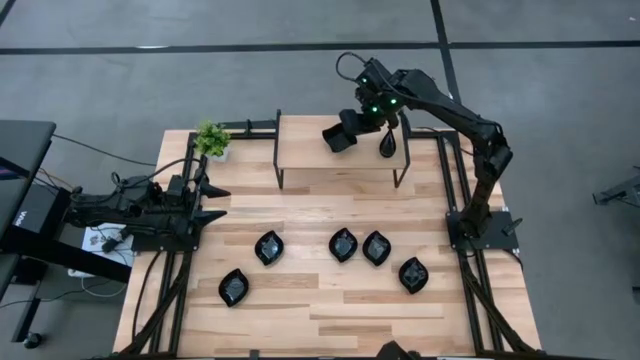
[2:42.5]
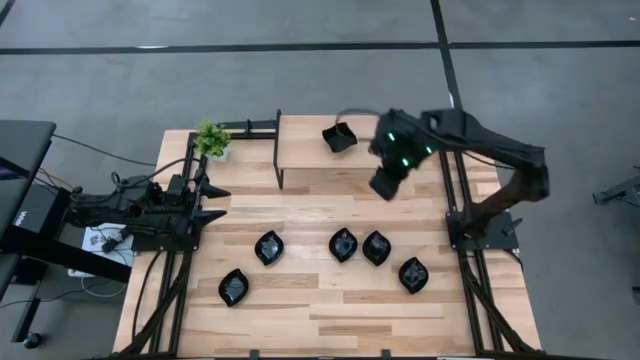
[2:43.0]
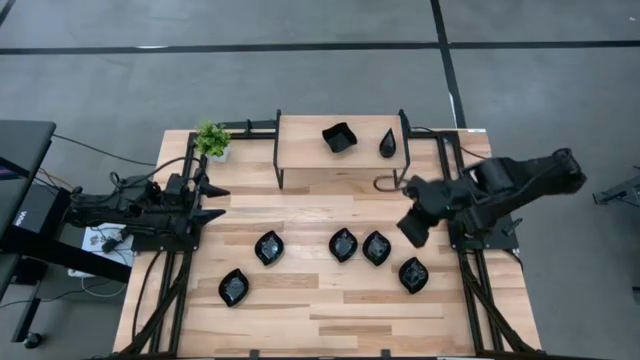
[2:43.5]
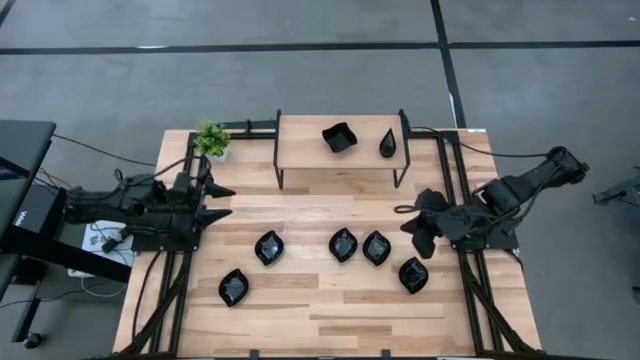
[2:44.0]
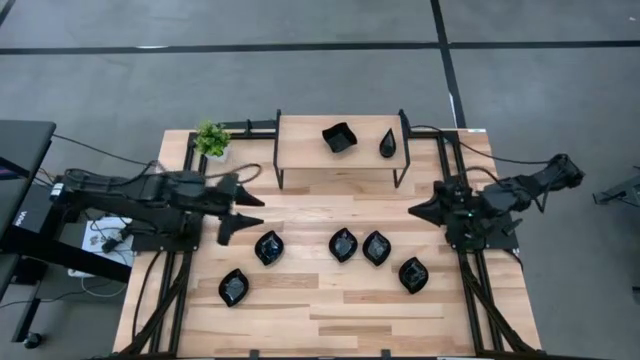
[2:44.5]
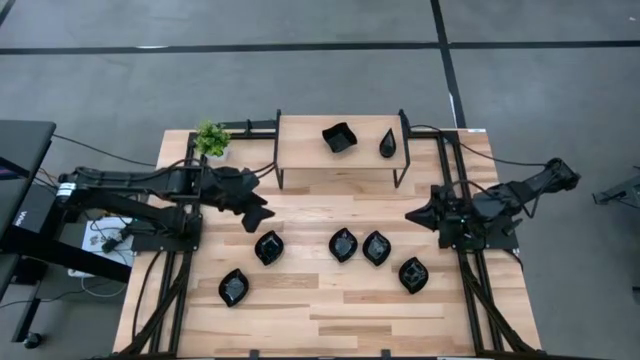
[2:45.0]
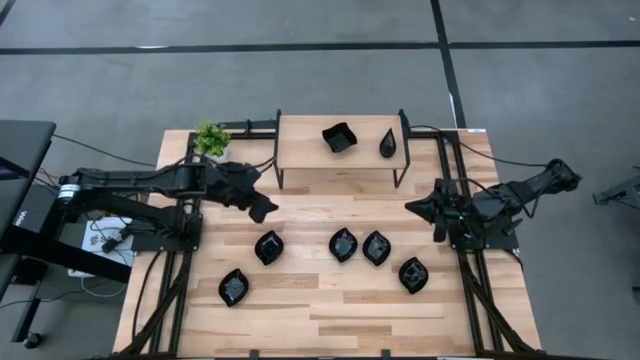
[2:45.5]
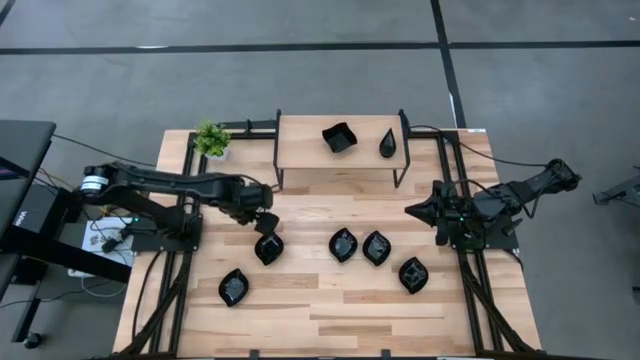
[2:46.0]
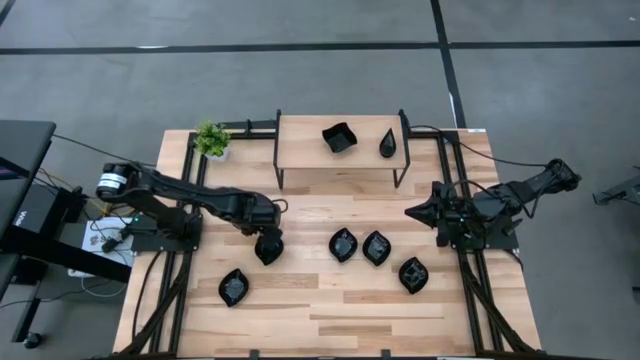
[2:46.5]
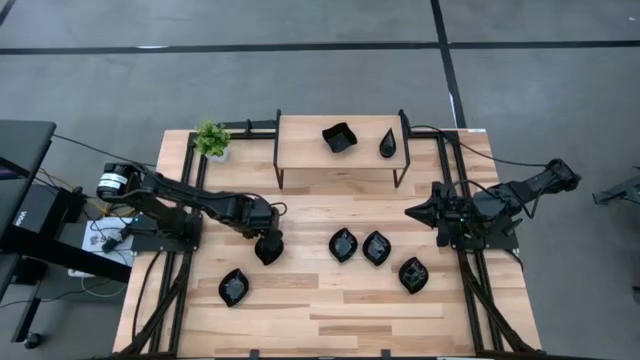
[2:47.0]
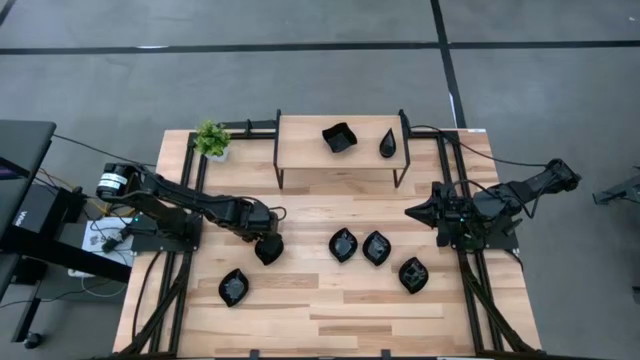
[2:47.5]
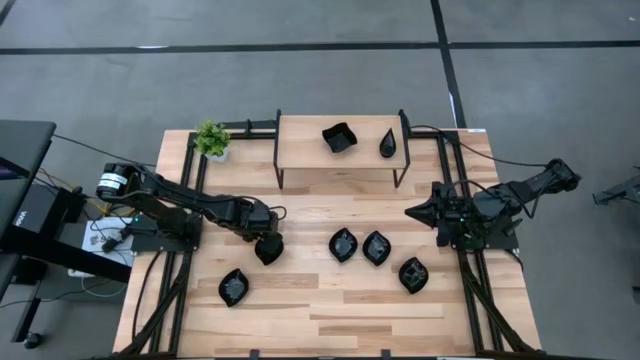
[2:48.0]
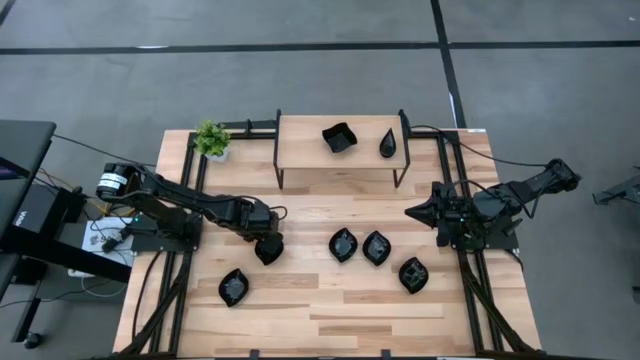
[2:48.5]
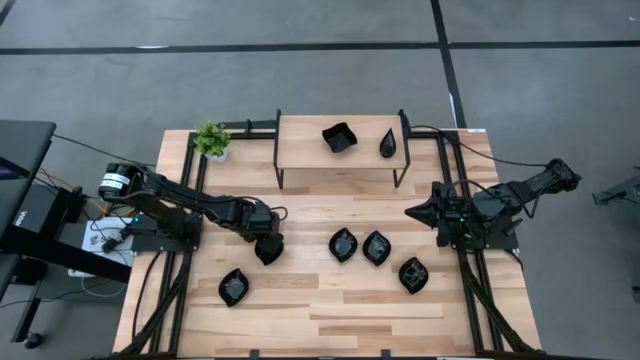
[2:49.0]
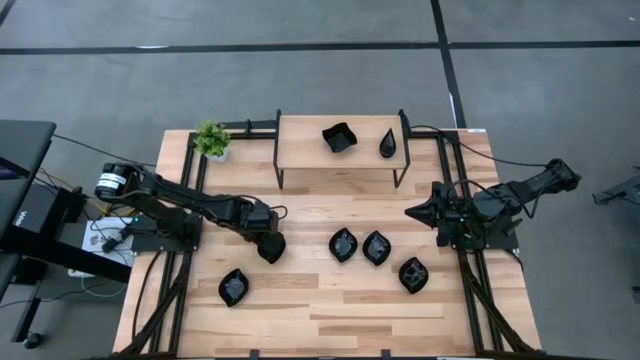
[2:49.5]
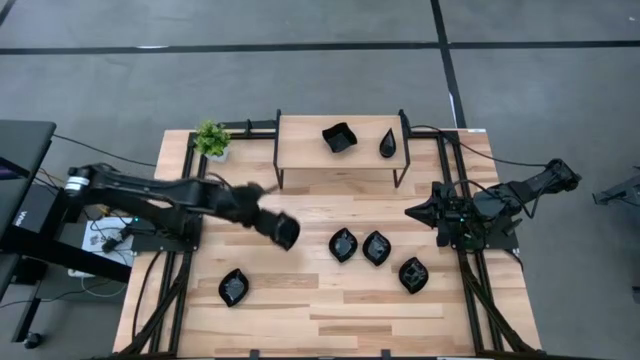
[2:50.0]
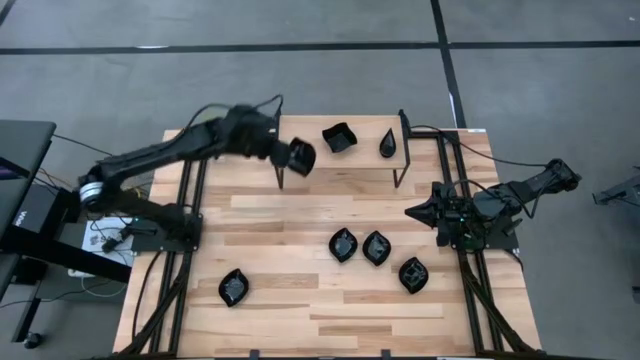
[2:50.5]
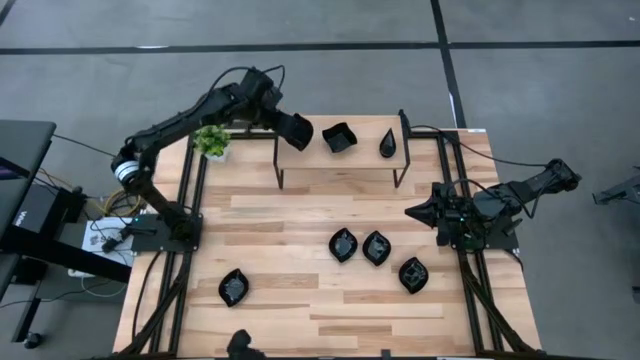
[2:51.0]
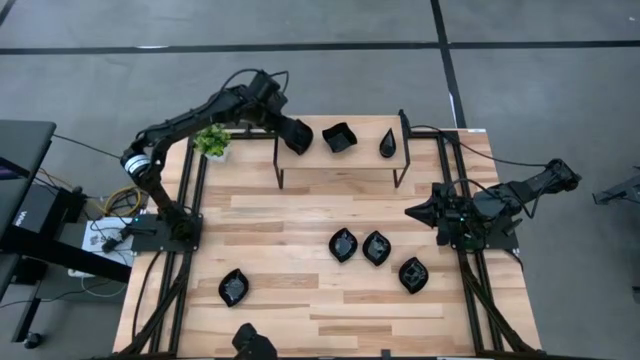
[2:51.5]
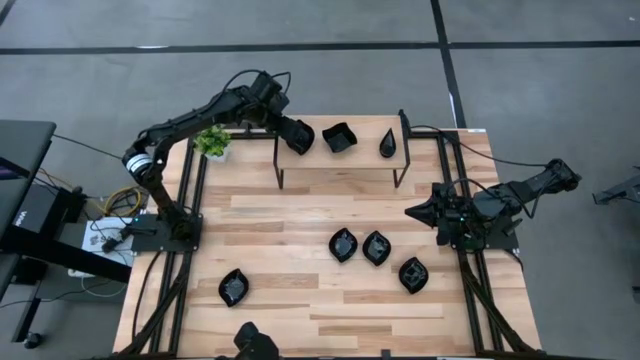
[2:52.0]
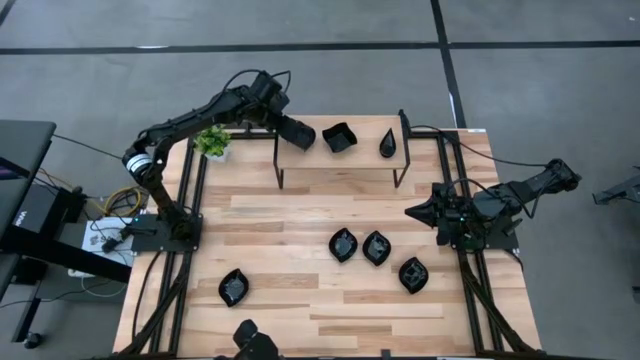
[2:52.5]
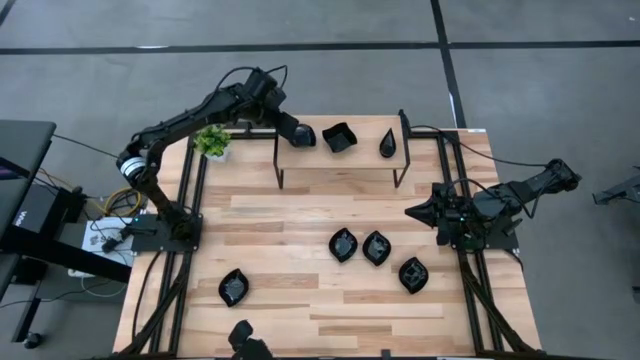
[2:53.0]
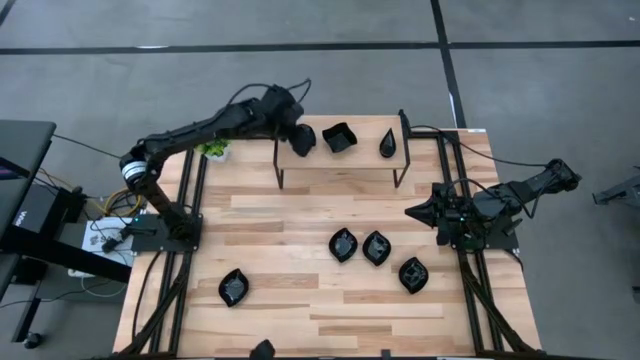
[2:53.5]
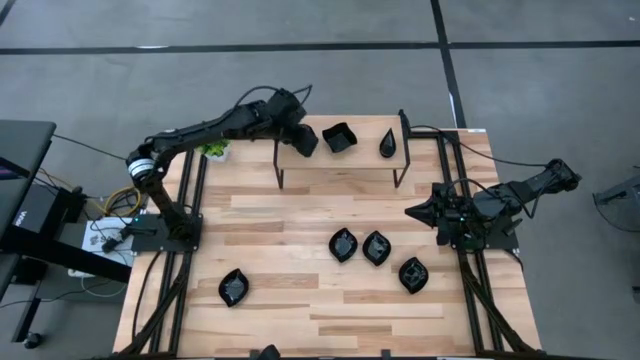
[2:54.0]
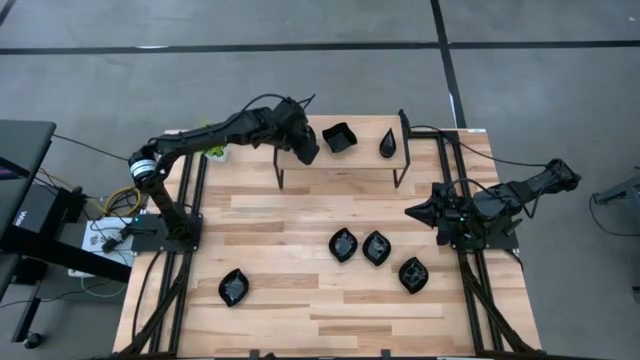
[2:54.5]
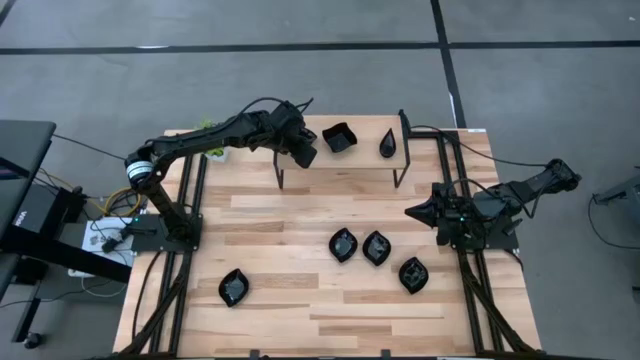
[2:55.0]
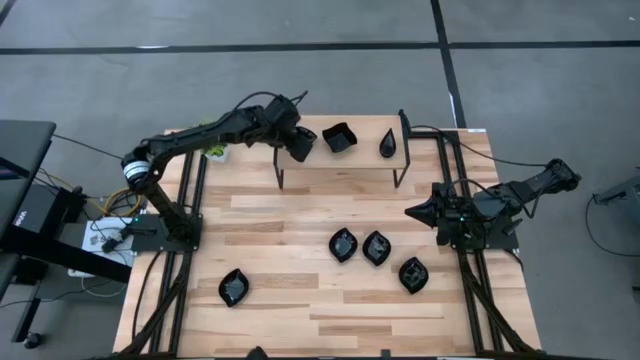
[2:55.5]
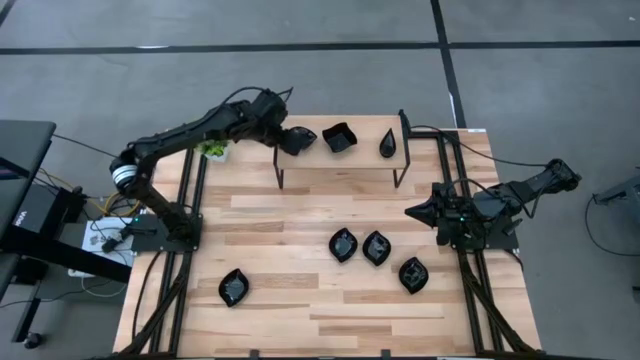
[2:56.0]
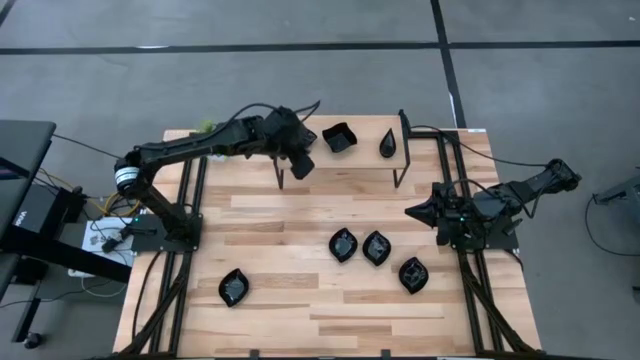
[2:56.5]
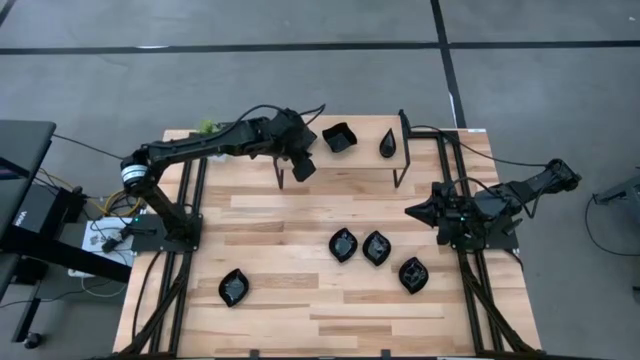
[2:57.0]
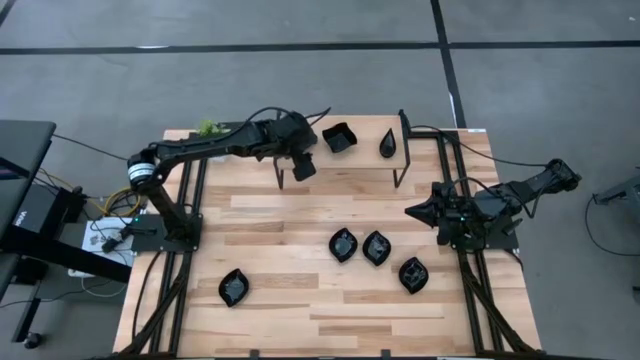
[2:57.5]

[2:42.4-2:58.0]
Task: Pick & Place Mini shaped plates
Put the black plate on the shelf

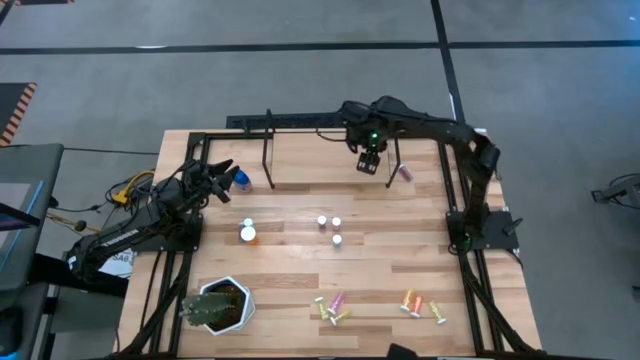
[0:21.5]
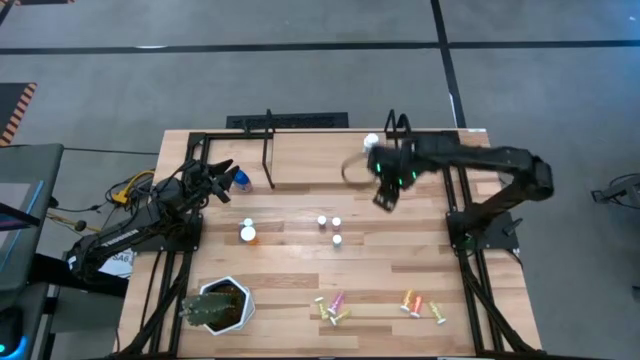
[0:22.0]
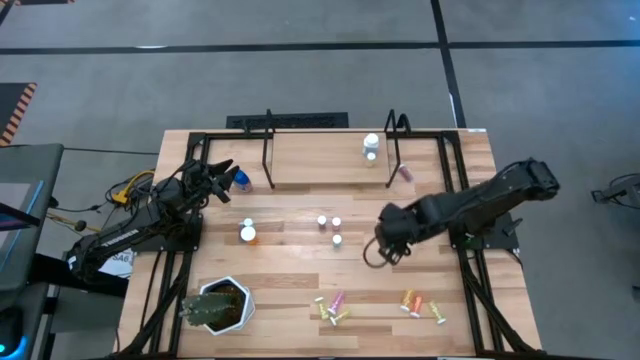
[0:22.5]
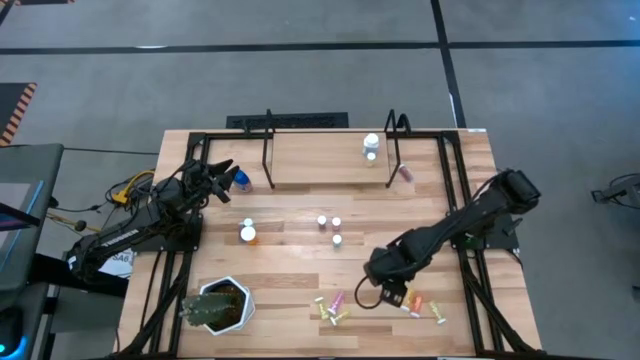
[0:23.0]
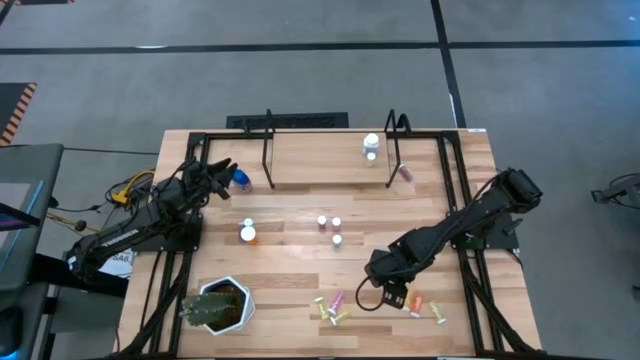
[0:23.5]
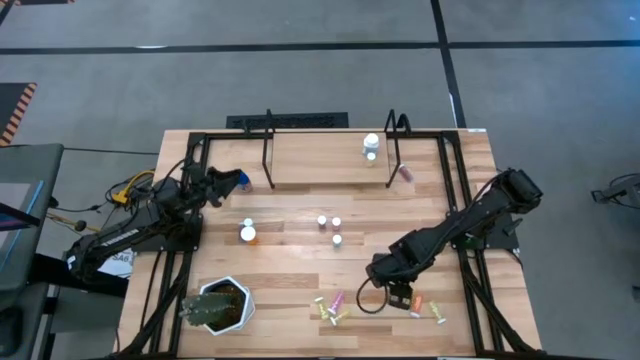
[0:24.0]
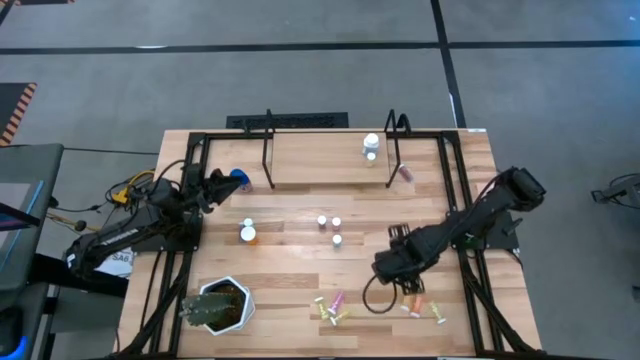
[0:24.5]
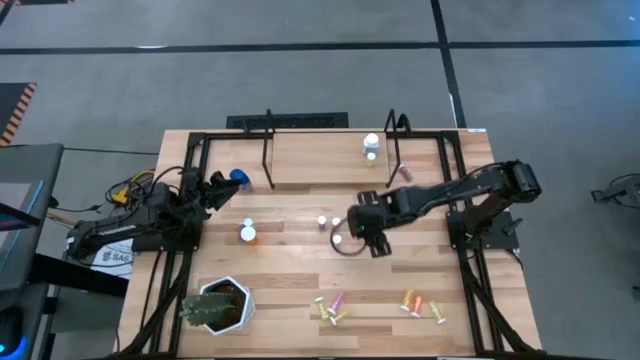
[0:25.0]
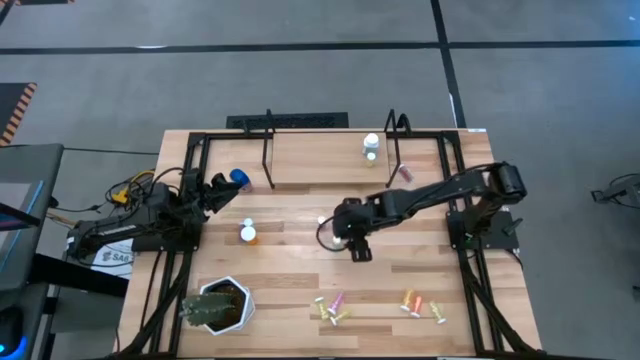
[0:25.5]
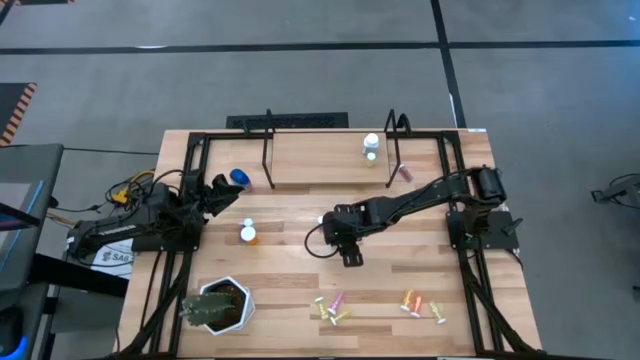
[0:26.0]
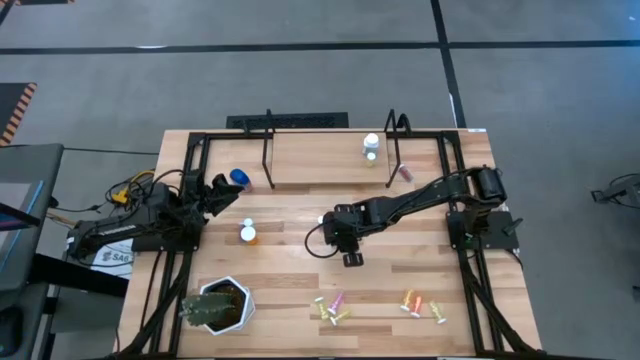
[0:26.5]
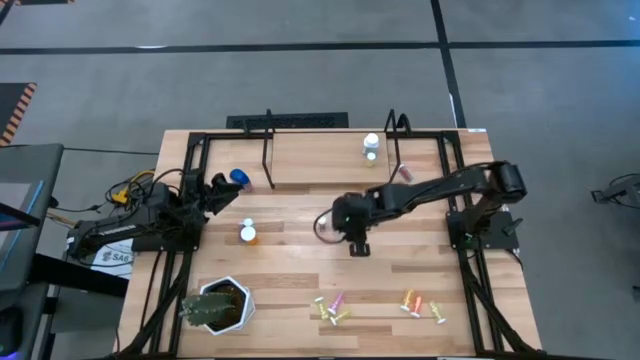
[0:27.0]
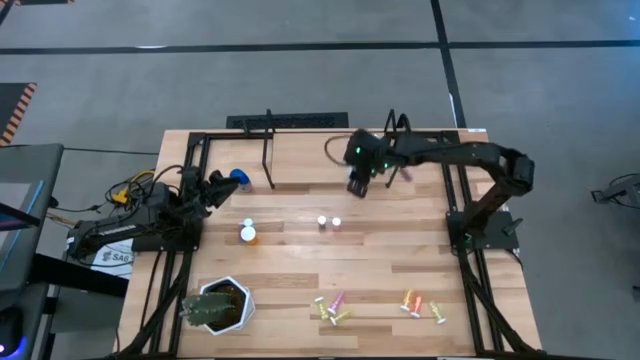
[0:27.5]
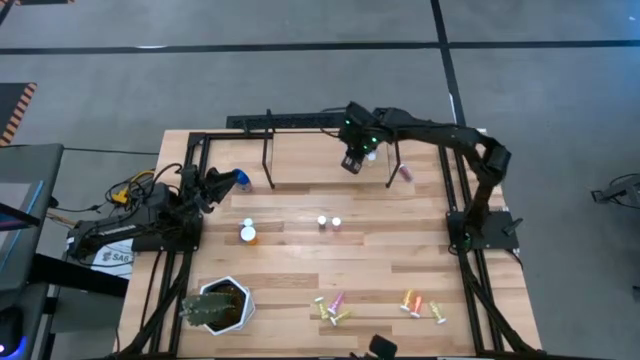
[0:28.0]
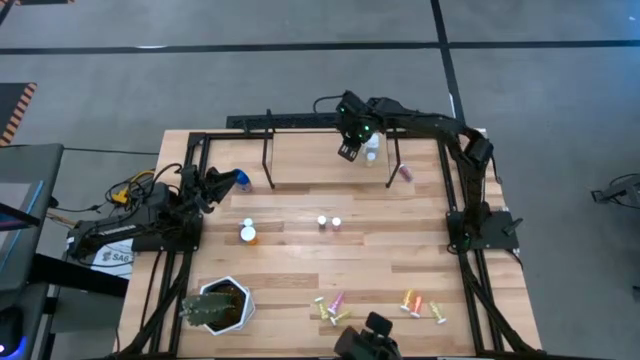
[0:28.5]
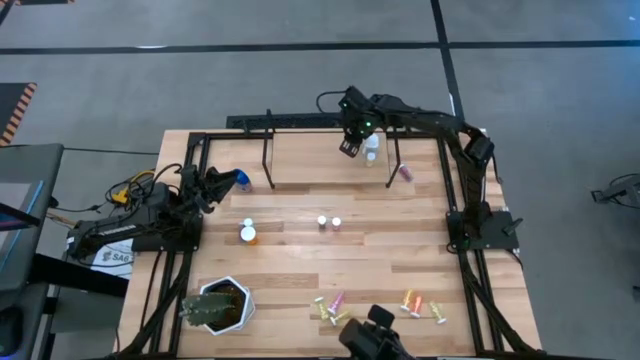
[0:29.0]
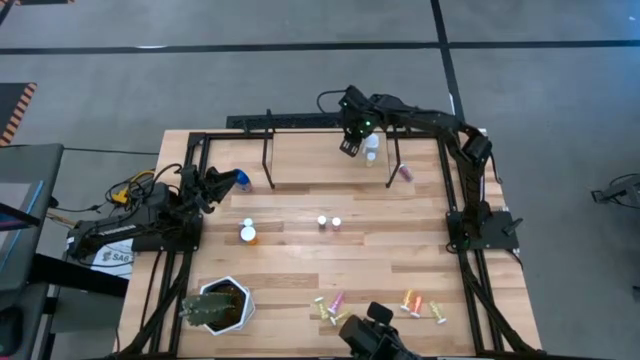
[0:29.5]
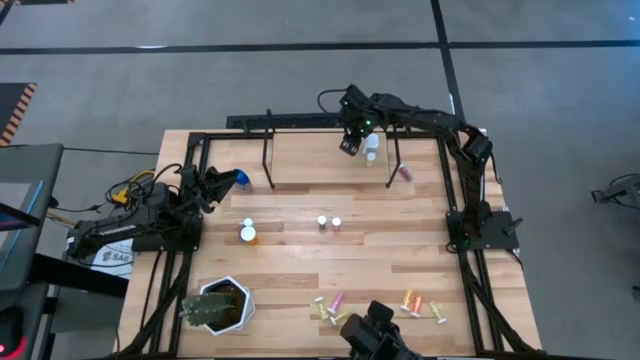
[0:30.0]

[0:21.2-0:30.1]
Task: Pick and place medicine bottles onto shelf by color
Put the blue pill bottle on the shelf
